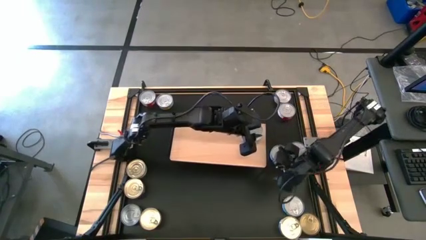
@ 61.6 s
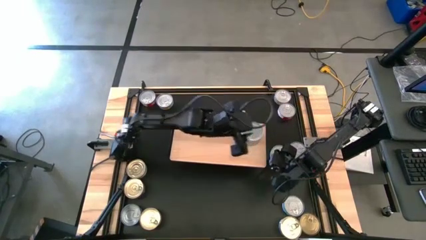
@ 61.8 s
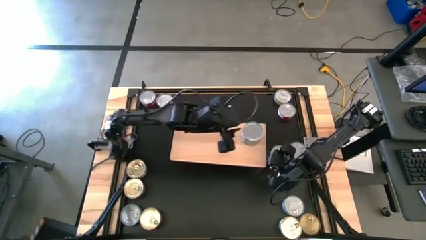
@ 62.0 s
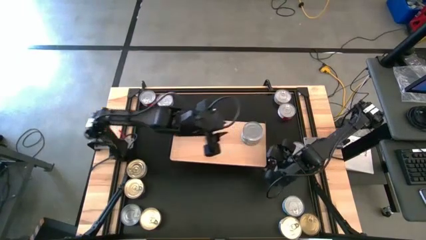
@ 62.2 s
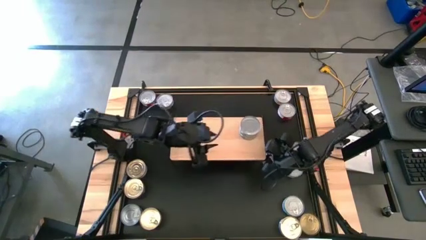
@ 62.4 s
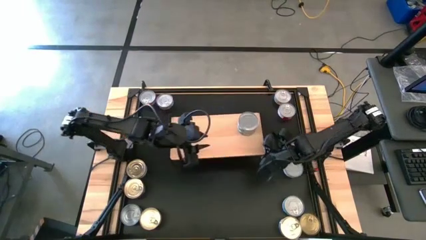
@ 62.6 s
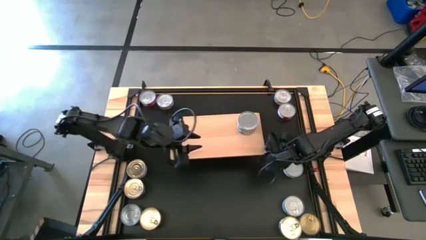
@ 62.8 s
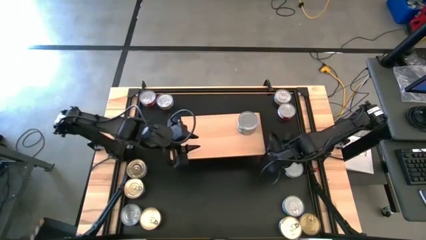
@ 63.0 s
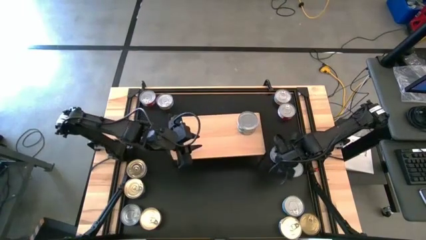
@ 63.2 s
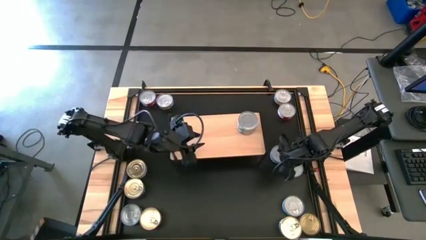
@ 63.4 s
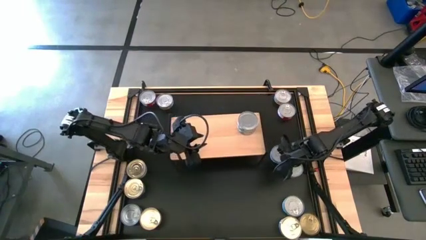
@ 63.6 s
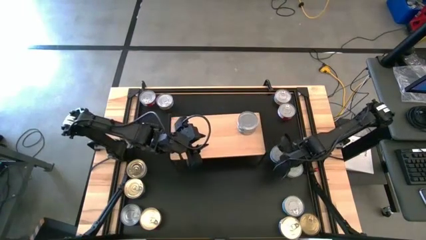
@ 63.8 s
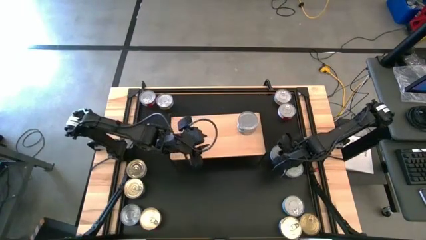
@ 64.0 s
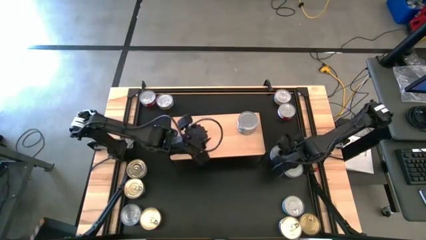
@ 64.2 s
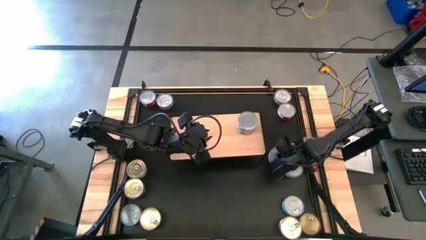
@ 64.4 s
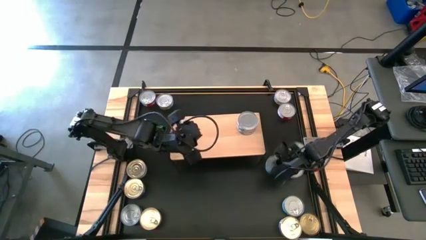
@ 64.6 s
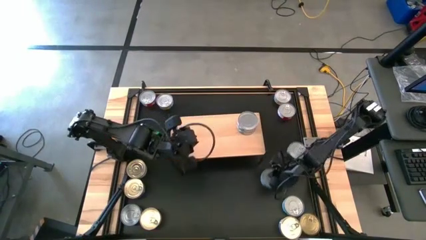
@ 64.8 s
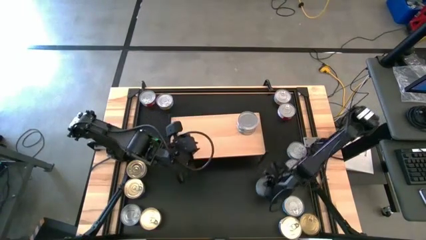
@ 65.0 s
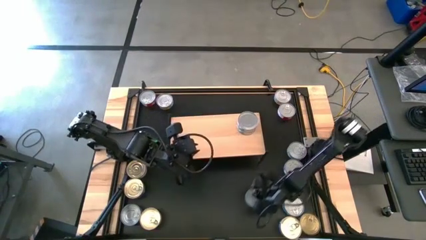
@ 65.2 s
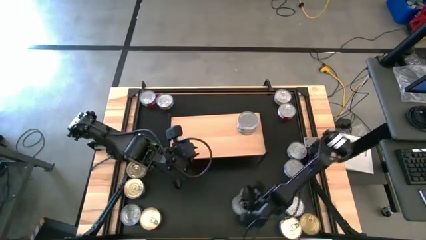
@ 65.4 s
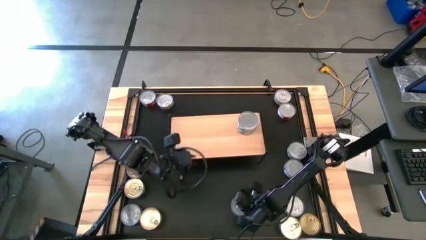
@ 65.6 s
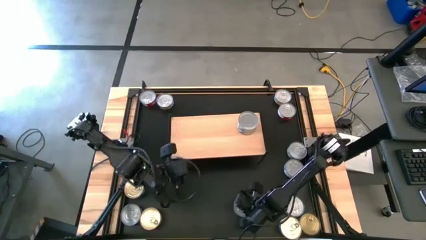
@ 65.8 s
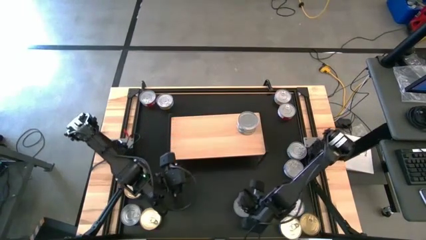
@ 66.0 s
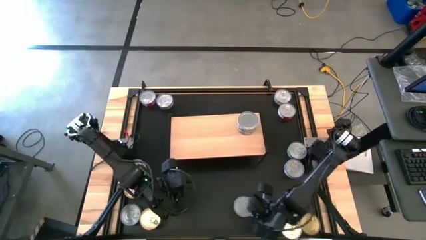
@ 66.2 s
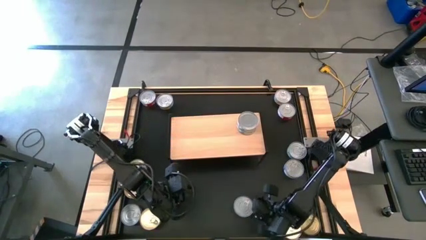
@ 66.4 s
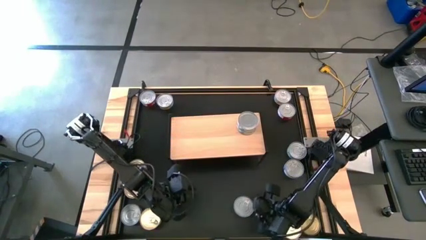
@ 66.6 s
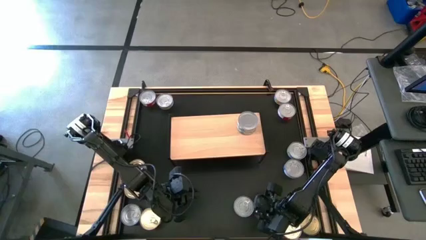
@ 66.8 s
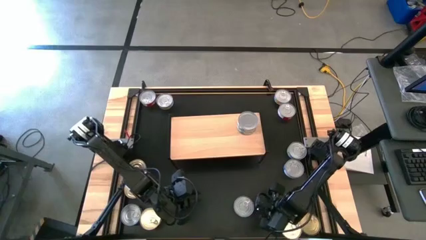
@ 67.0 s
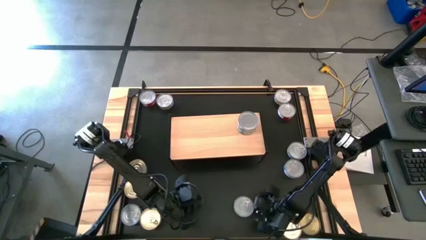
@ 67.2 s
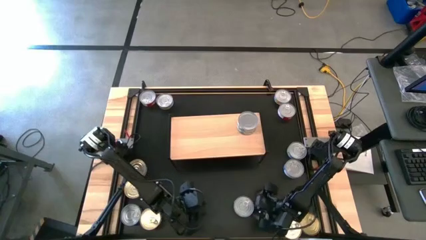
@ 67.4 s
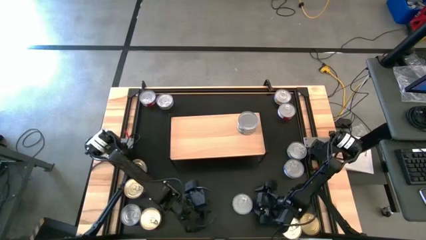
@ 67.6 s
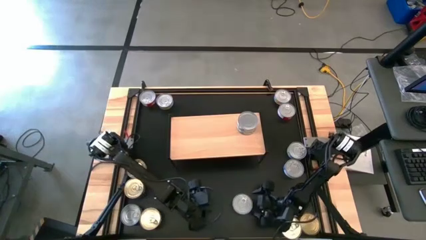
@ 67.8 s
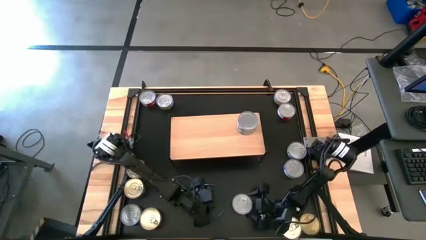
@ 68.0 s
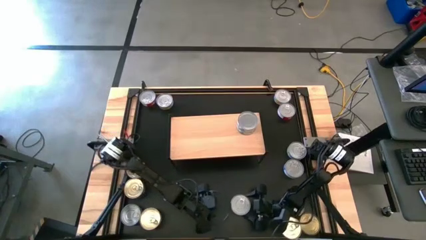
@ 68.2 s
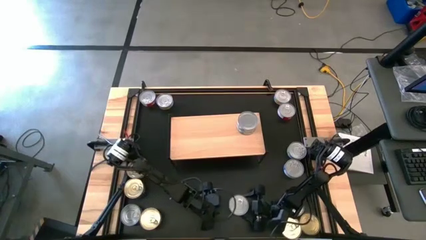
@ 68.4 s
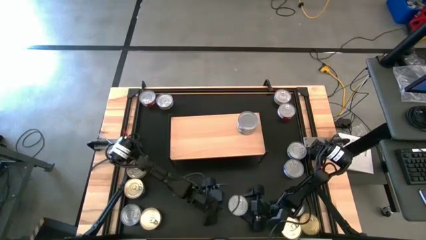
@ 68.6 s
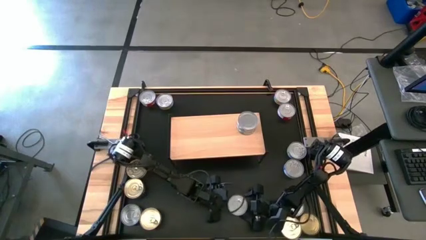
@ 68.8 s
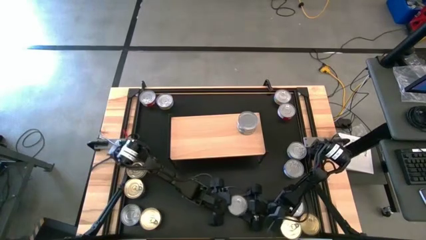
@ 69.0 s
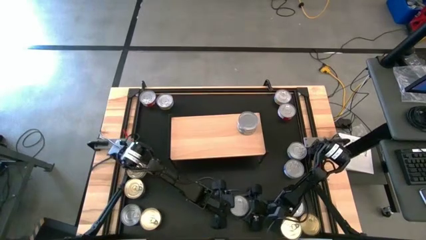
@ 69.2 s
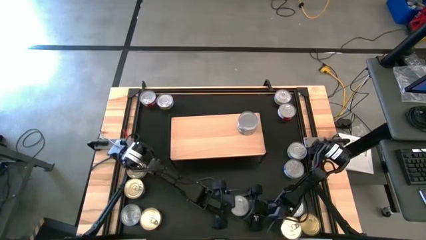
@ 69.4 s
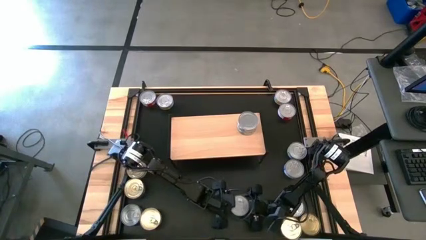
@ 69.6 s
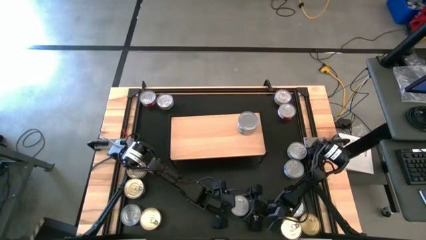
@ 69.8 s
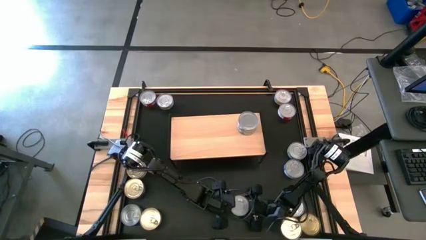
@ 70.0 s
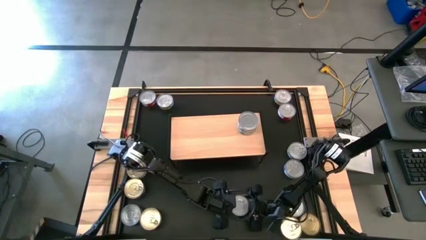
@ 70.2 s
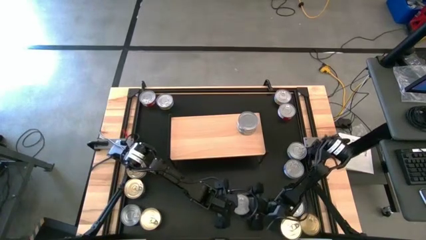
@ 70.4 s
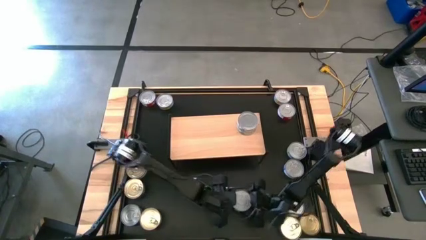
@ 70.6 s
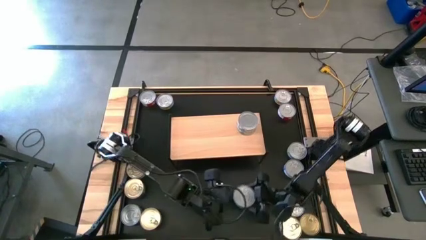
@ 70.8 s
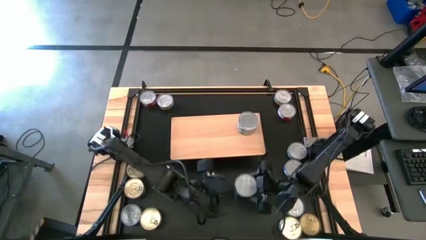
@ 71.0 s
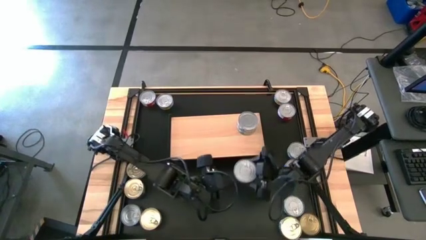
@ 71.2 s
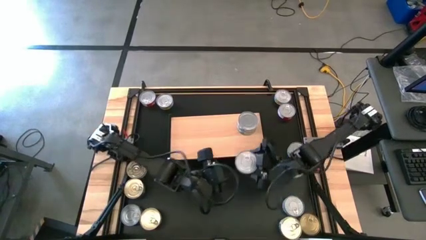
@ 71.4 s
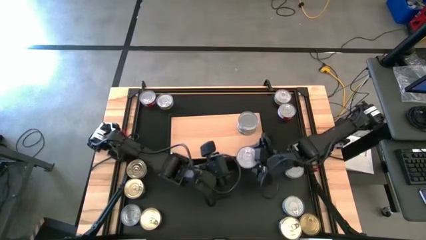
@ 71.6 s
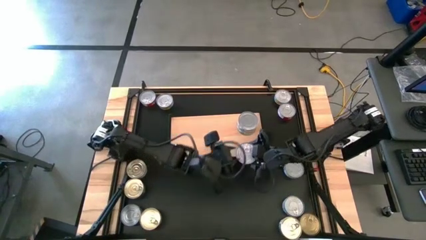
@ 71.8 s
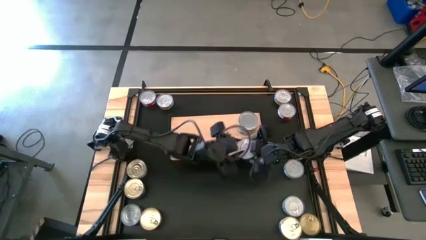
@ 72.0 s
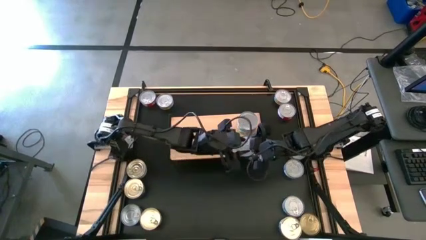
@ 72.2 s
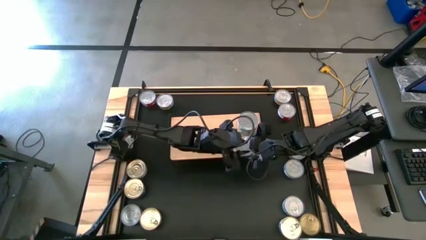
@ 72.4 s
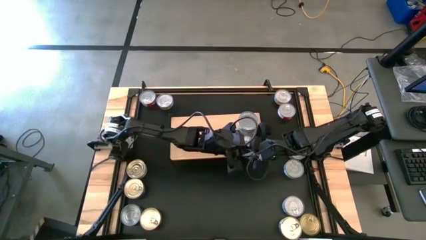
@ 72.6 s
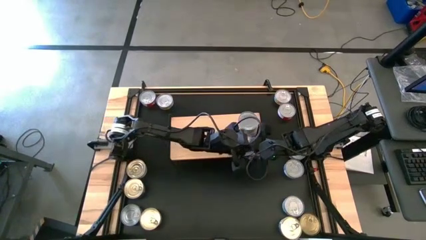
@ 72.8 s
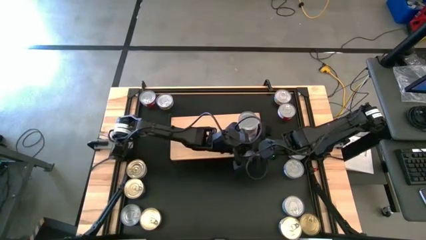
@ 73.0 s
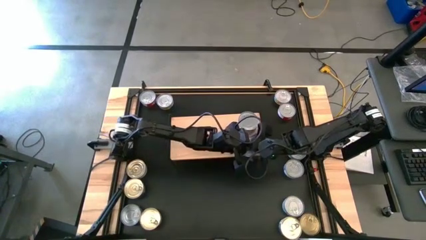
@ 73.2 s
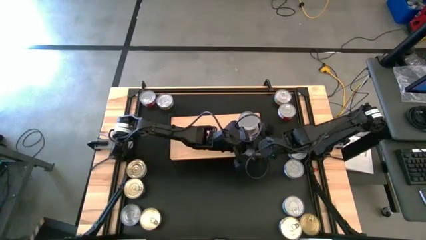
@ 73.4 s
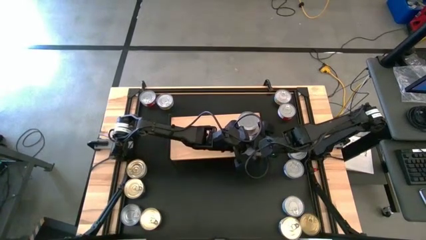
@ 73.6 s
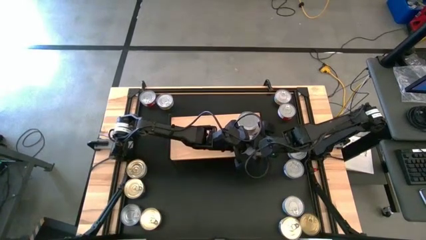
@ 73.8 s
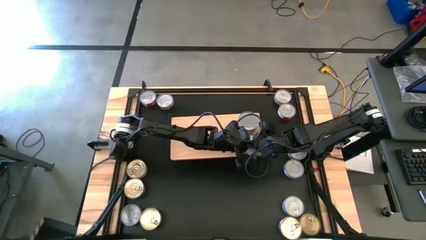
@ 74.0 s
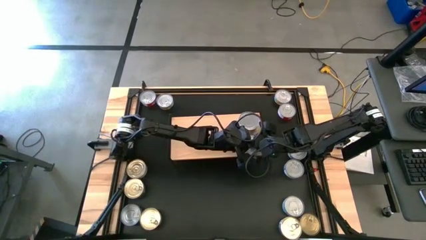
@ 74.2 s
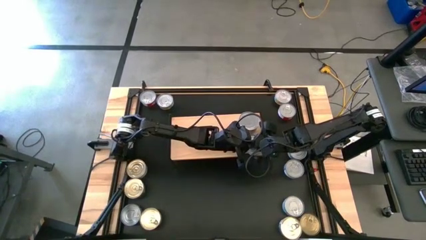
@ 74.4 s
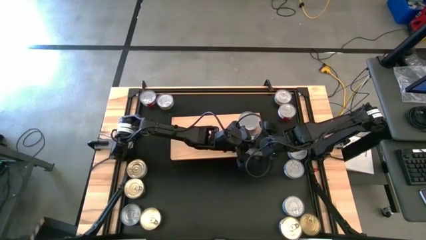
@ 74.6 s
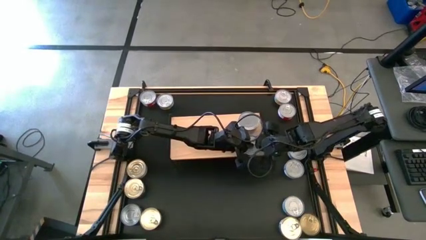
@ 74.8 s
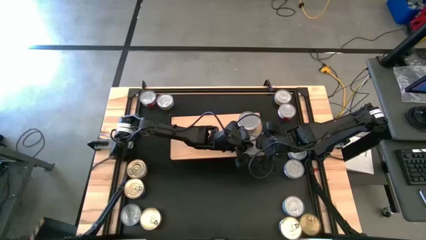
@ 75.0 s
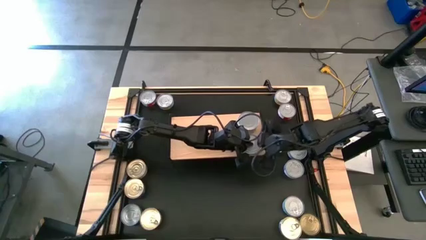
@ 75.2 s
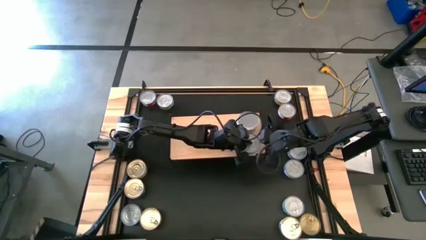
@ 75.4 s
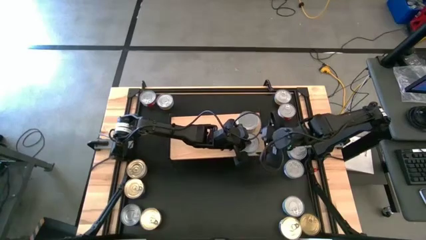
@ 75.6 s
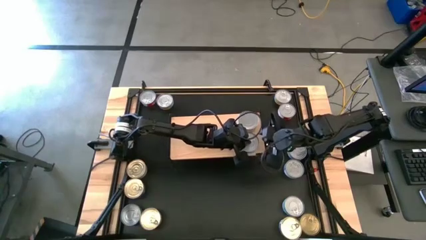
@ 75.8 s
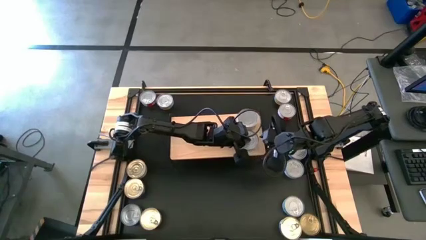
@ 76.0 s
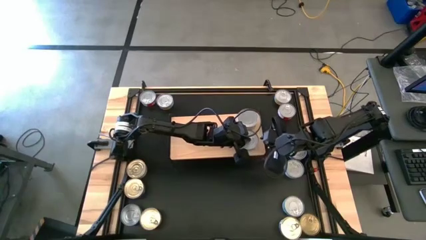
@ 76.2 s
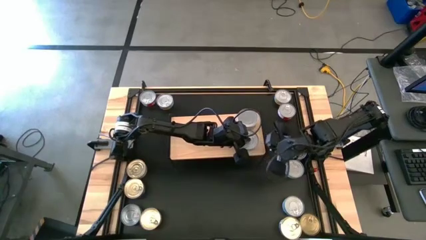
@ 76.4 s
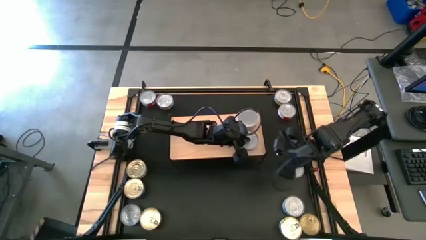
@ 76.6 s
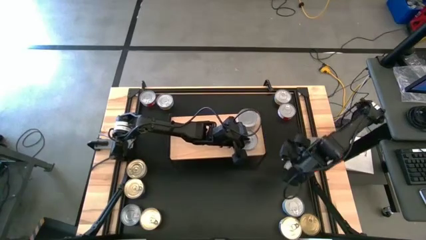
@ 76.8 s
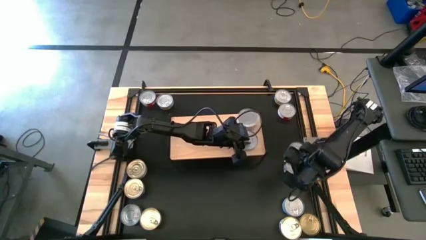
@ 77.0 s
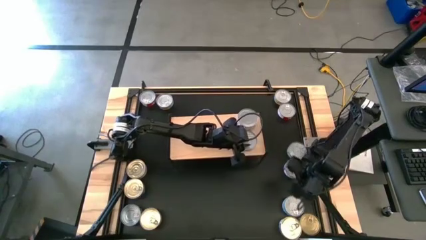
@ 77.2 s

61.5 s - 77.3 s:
Task: Stack canned seafood by type on shelf
Put the green blue tuna can on the shelf

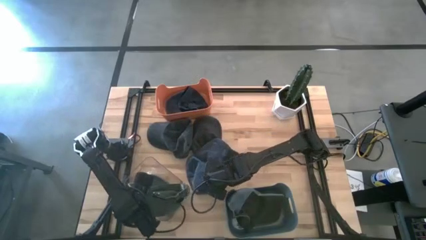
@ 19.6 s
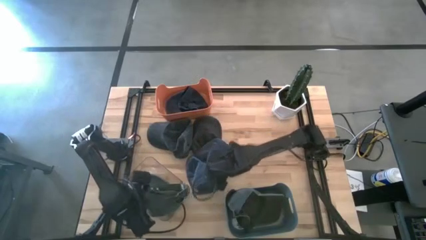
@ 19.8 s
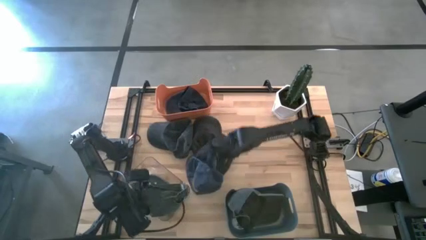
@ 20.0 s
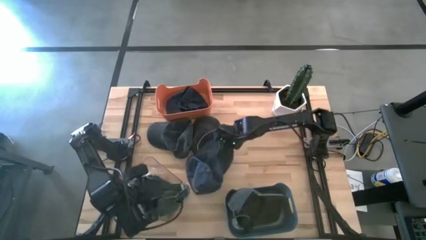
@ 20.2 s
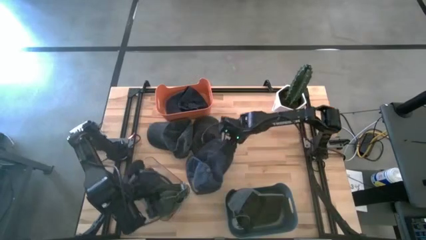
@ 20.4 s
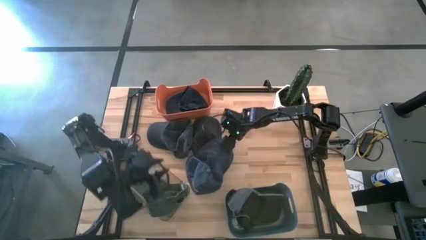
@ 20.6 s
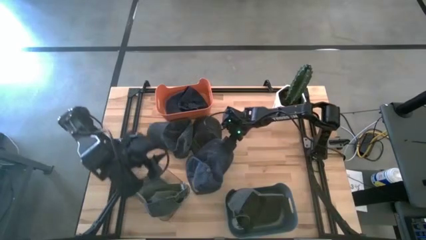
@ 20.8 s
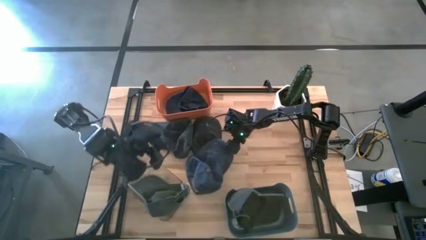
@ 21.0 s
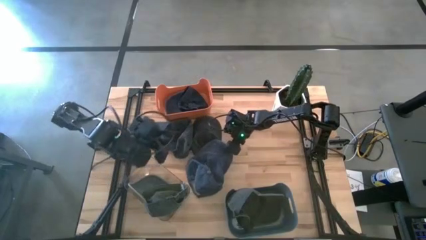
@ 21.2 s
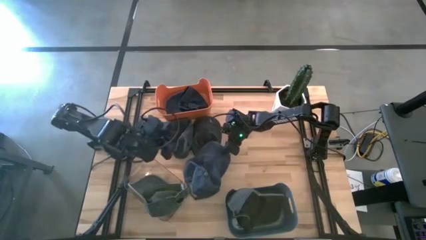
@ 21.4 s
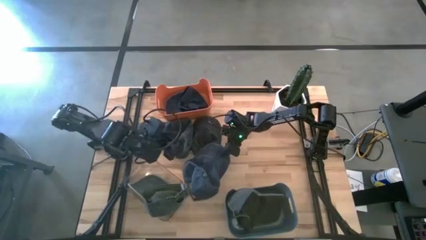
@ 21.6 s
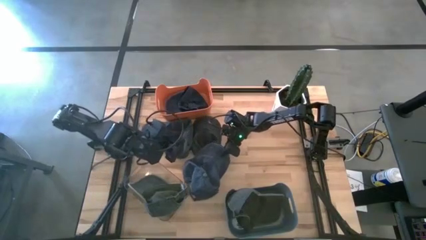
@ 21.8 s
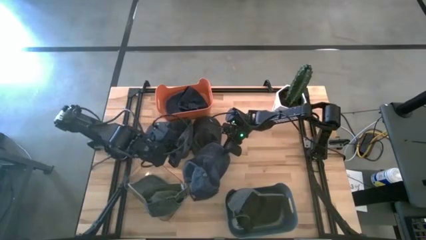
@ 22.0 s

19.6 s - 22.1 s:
Task: Pick & Place hat
Put the blue cap into the orange bin
